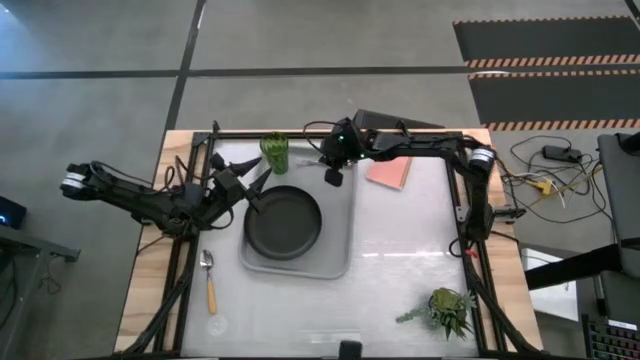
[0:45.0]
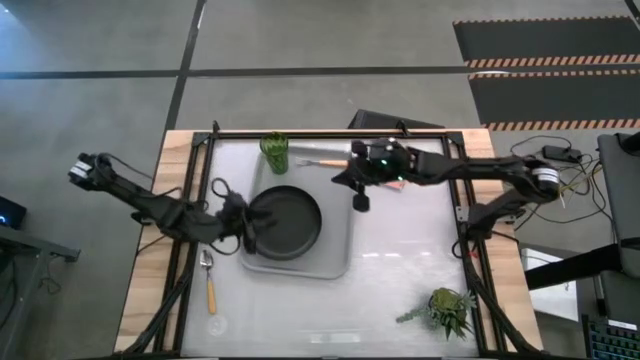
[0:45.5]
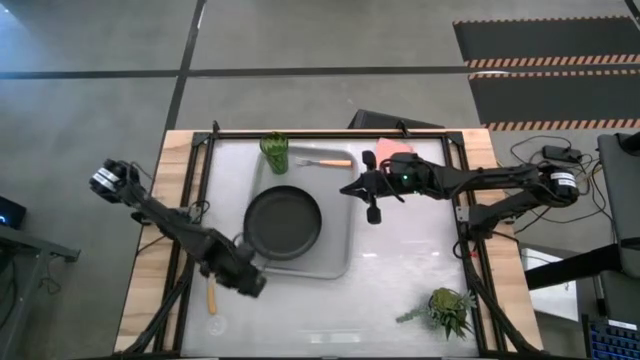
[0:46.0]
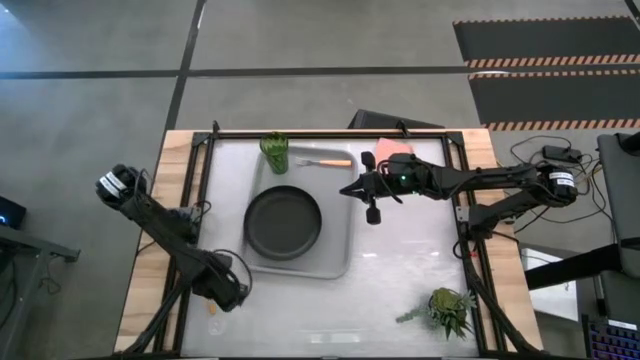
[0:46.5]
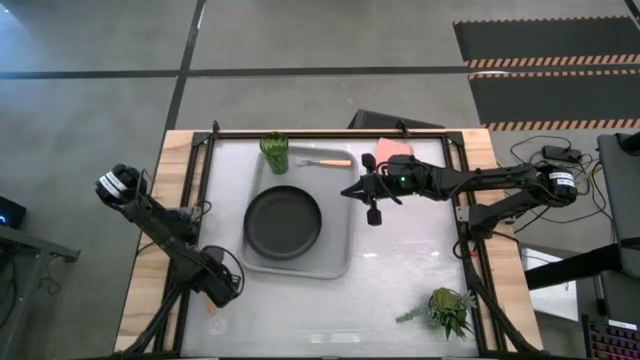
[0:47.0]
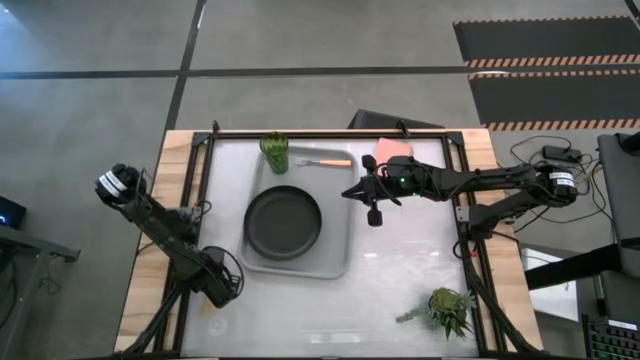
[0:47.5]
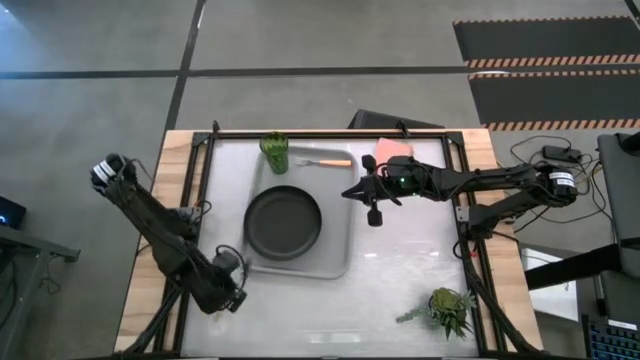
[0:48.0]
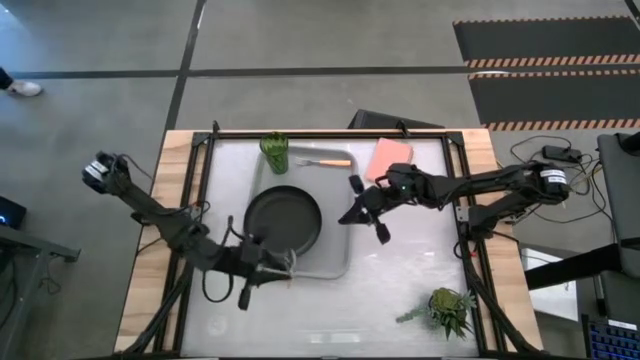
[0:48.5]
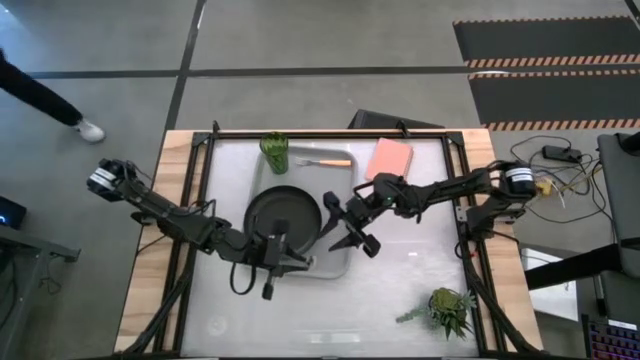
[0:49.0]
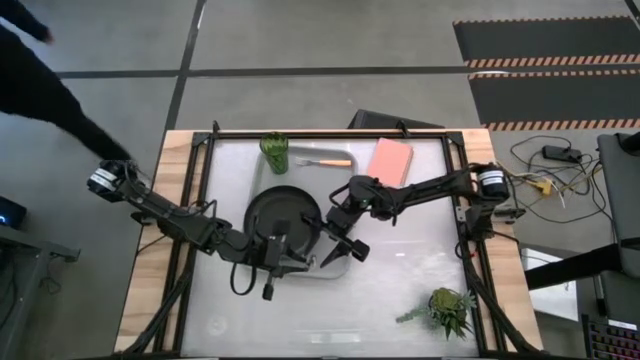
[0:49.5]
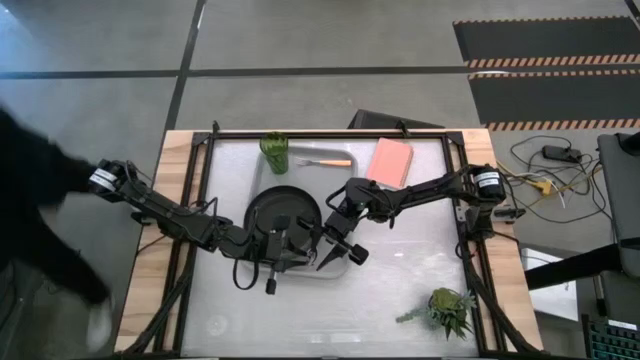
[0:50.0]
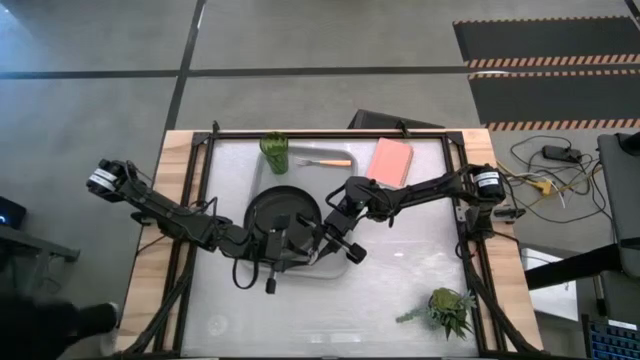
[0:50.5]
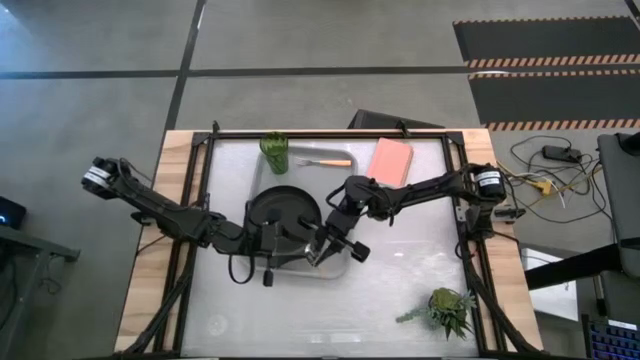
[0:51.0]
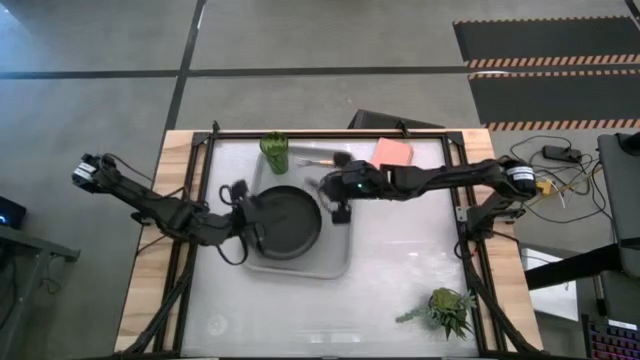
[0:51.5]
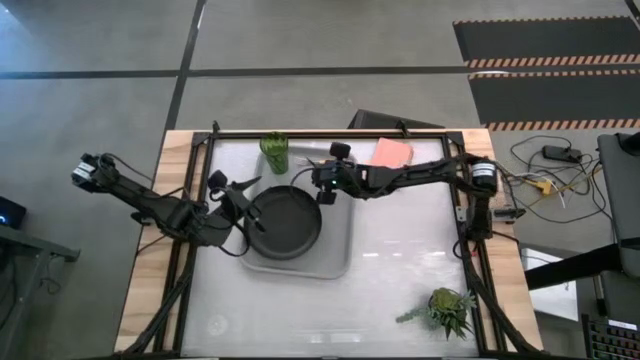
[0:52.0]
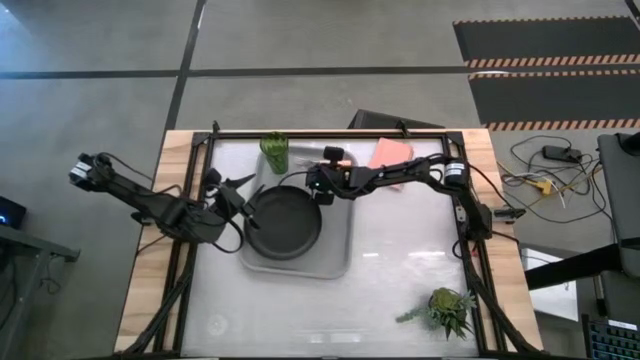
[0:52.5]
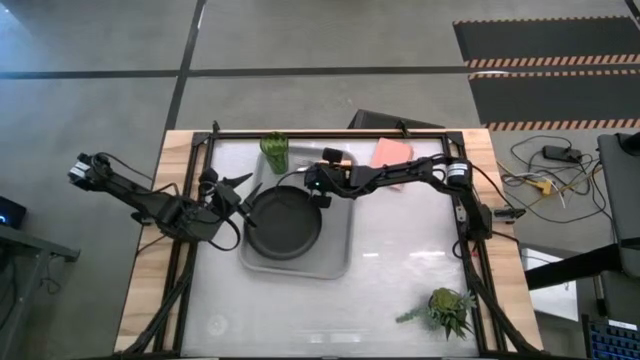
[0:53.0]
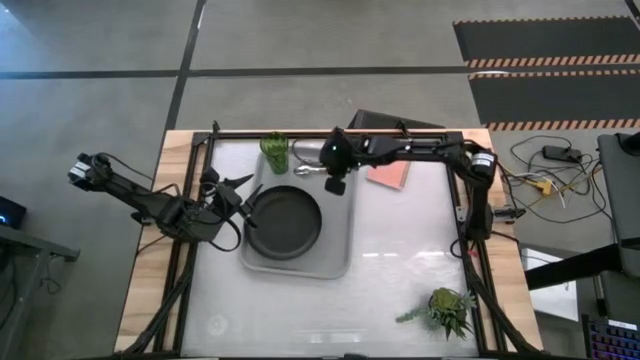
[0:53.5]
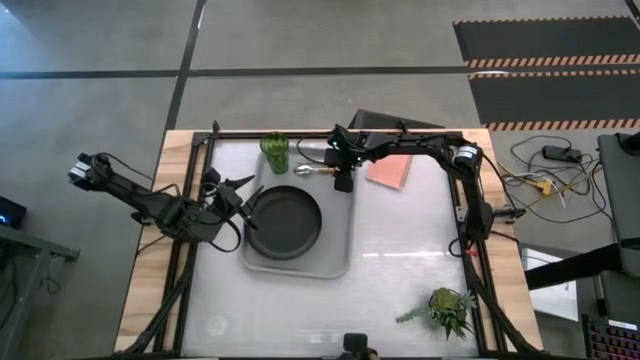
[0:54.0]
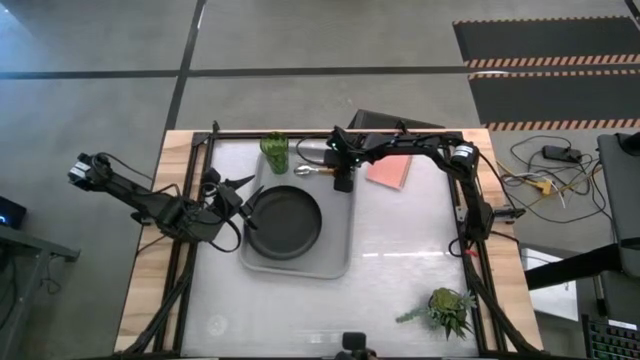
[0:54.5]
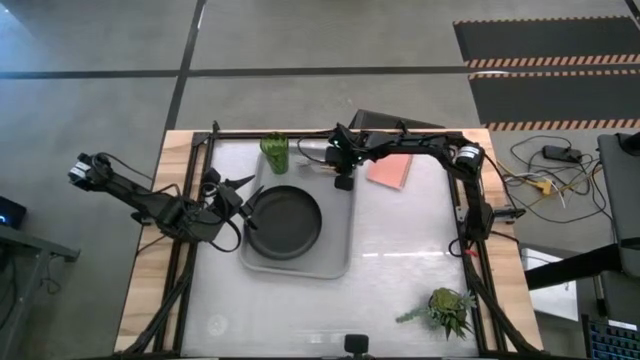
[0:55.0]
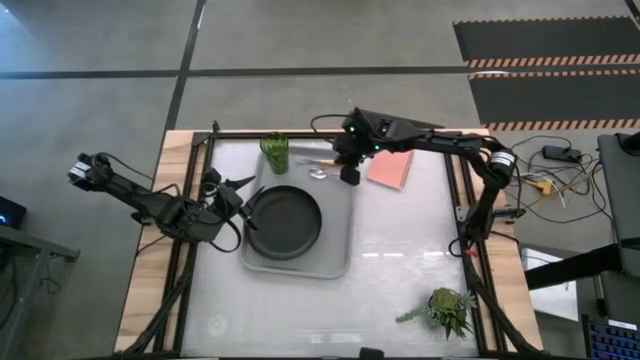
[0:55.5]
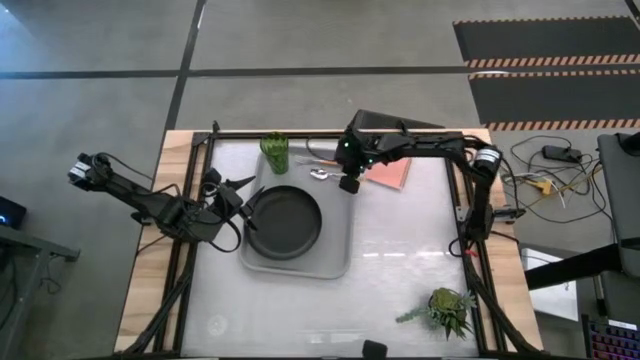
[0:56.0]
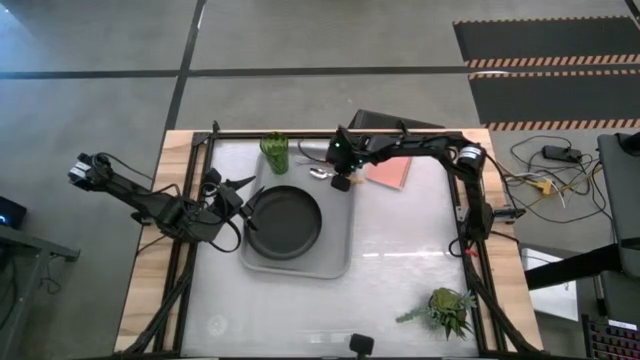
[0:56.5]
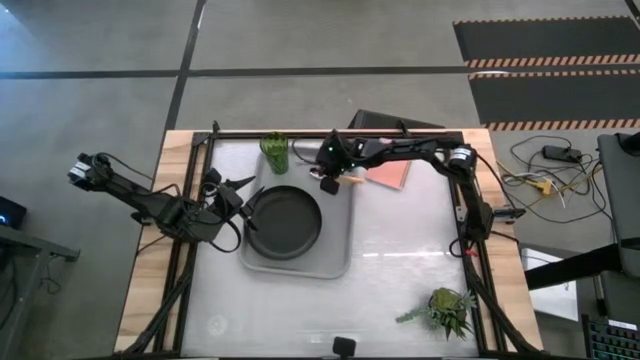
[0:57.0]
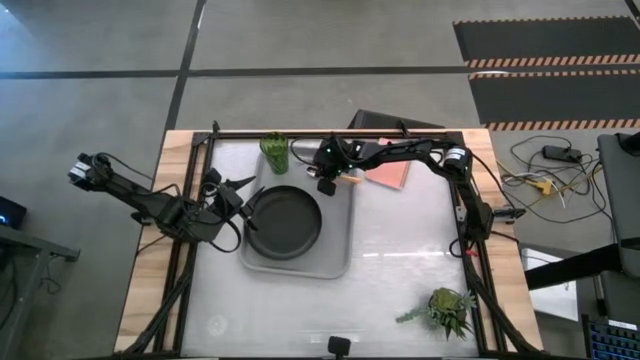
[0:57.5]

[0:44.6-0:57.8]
Task: Pick and place plate/cup/fork/spoon on tray
Put the yellow spoon on the gray serving tray to the left of the yellow fork

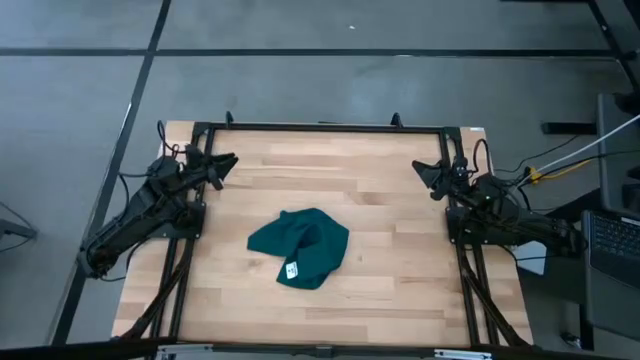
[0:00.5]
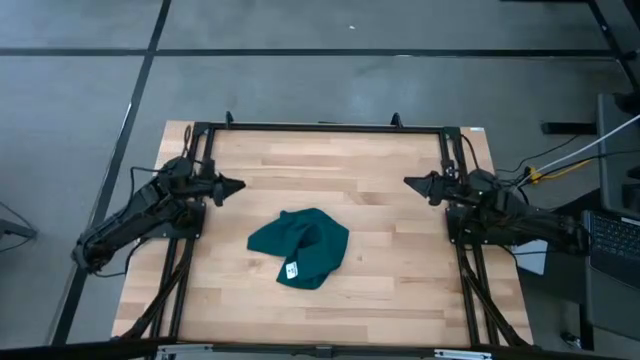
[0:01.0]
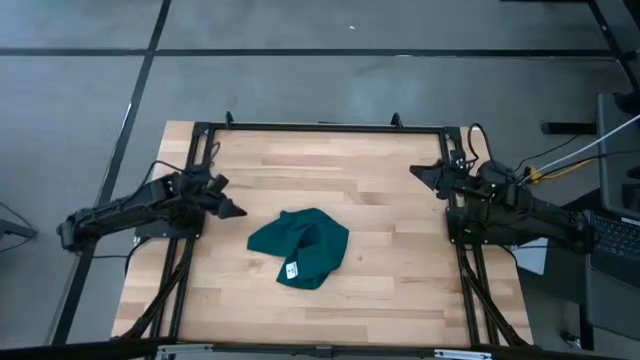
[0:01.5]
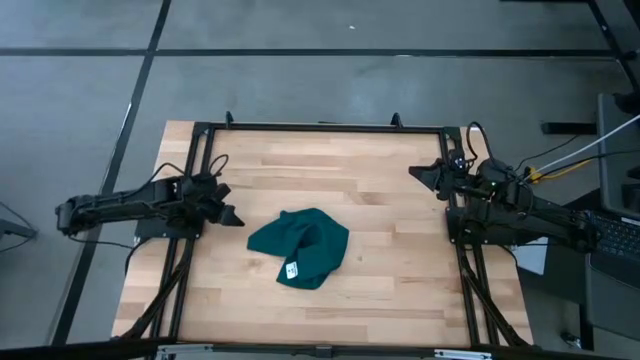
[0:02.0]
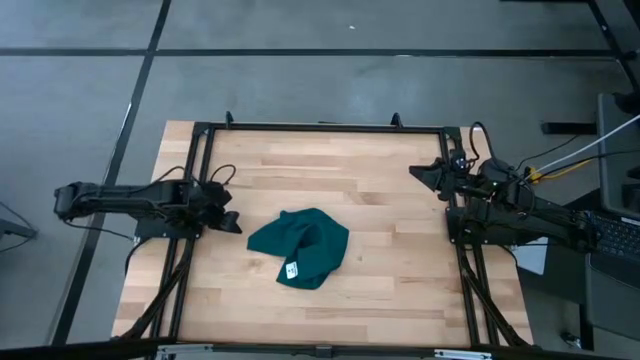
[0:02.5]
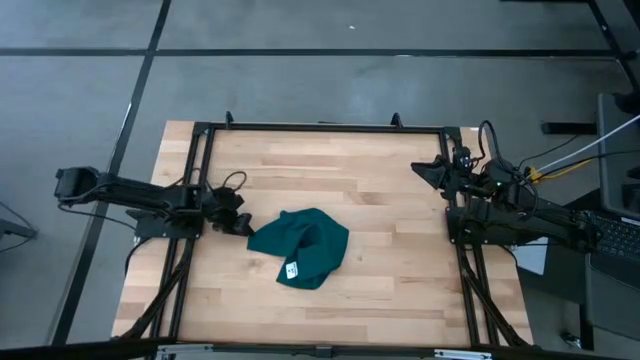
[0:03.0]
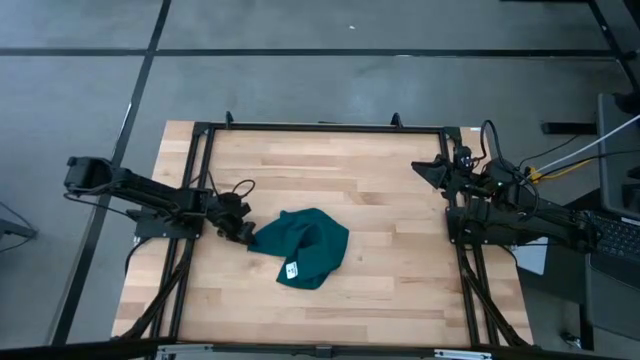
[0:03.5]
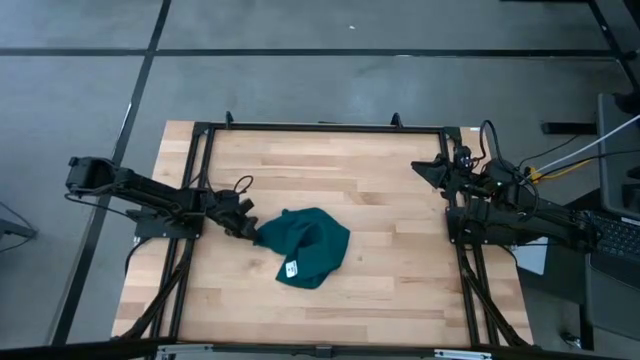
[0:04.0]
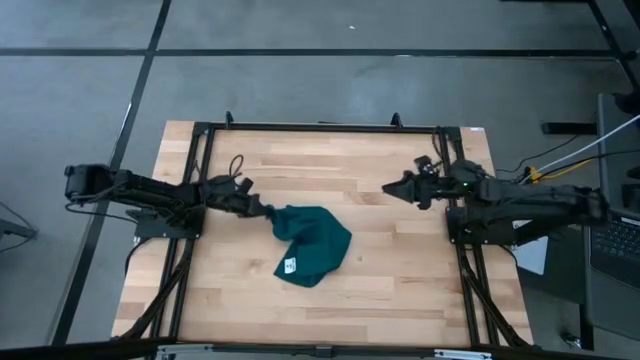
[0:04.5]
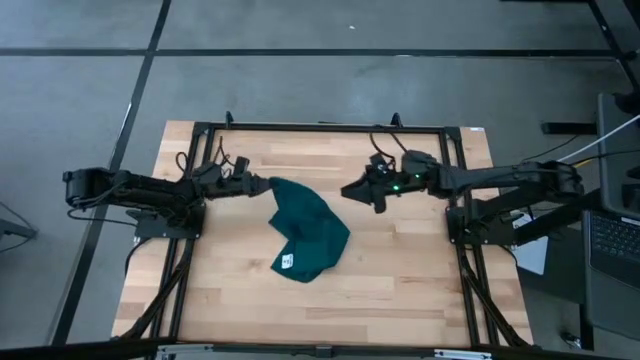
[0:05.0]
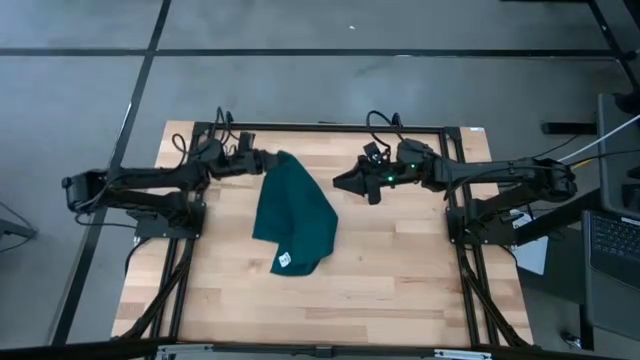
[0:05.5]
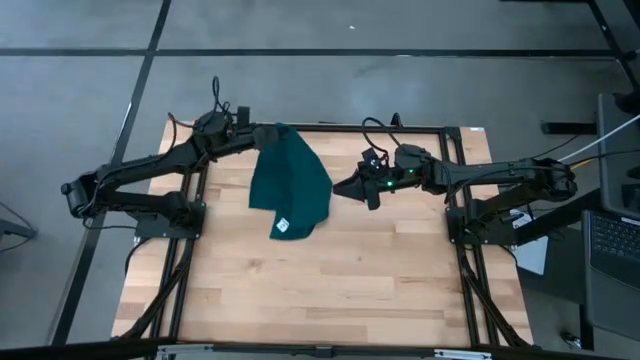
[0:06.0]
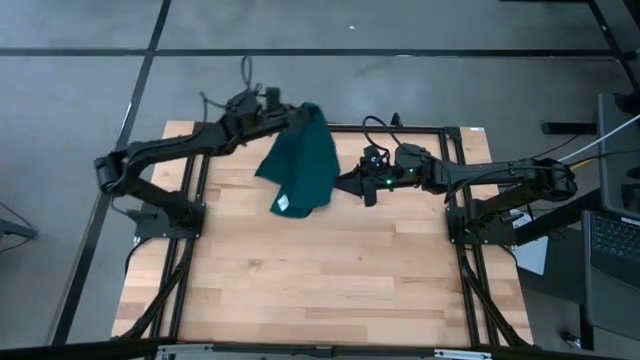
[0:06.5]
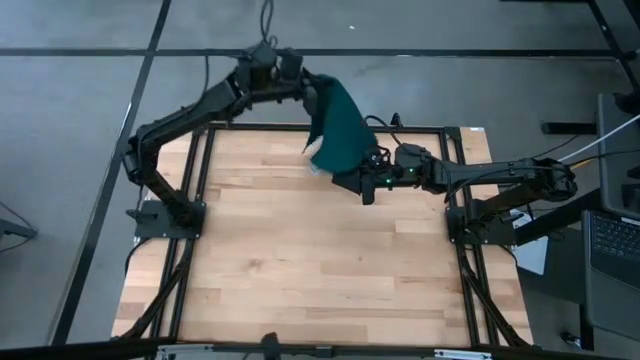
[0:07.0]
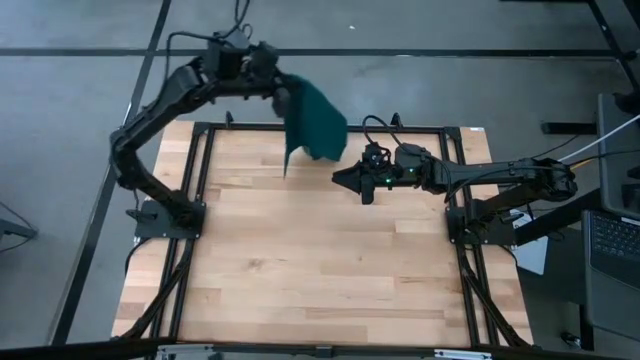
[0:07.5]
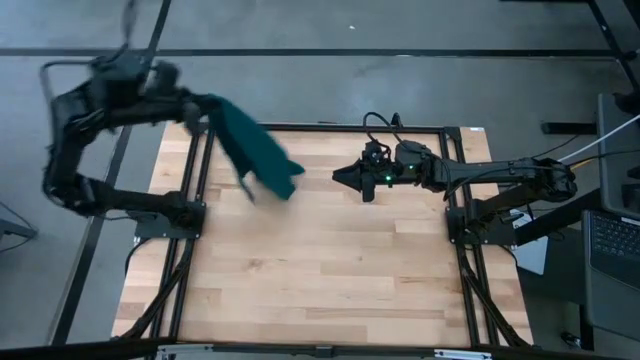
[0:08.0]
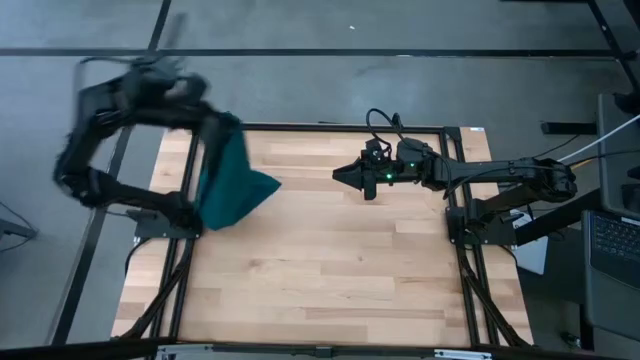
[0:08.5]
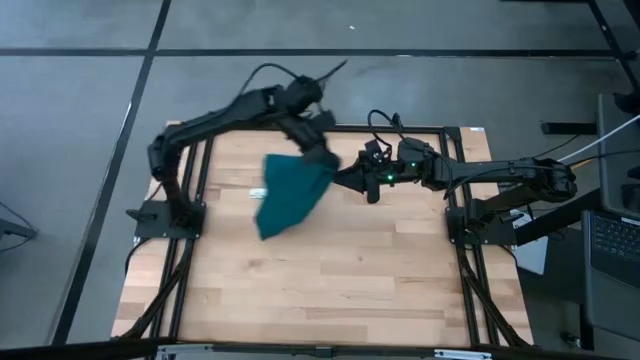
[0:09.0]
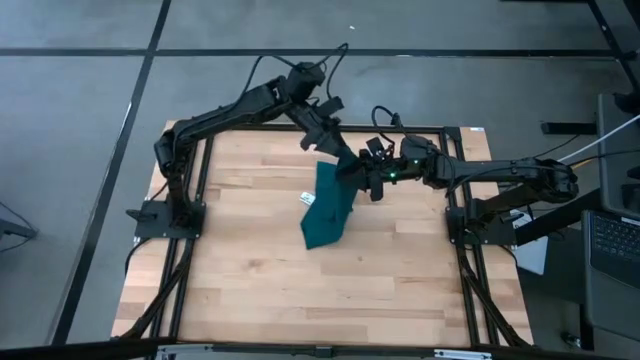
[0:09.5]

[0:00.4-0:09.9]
Task: Fold microfiber towels
Fold the blue napkin

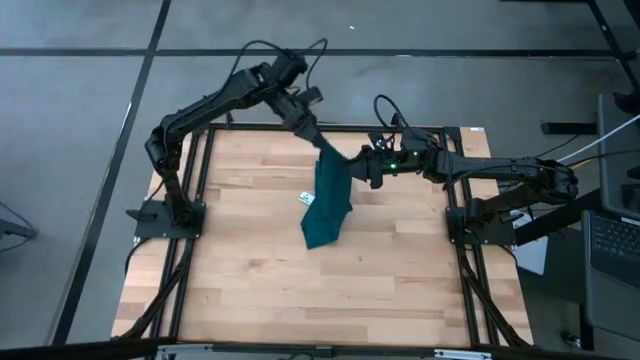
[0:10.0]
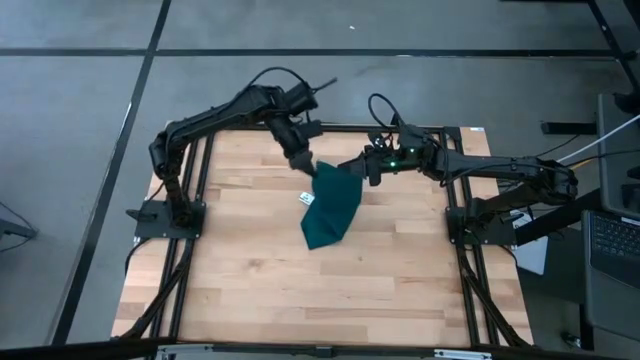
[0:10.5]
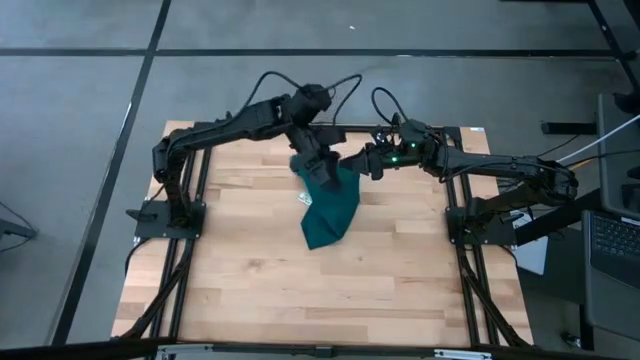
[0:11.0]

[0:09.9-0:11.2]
Fold the blue napkin
